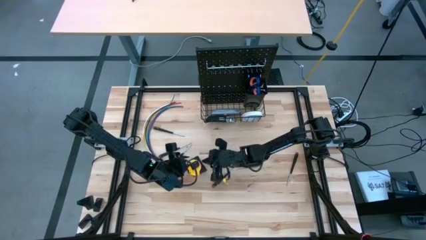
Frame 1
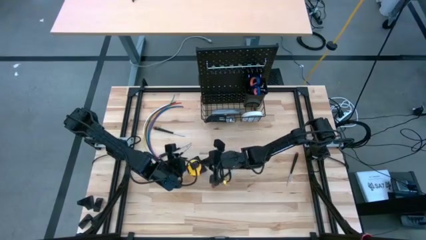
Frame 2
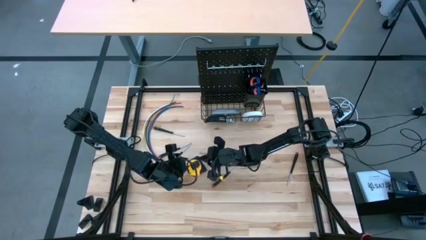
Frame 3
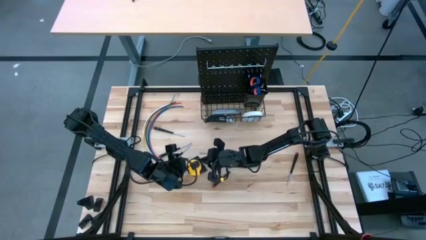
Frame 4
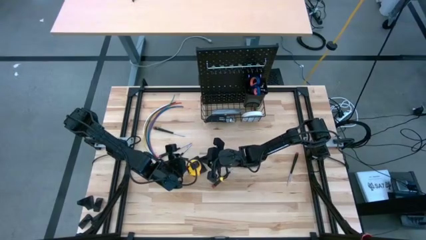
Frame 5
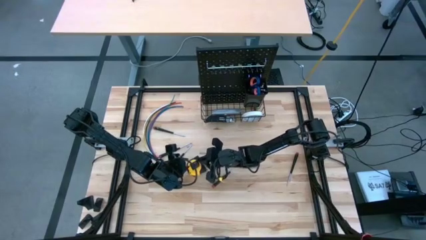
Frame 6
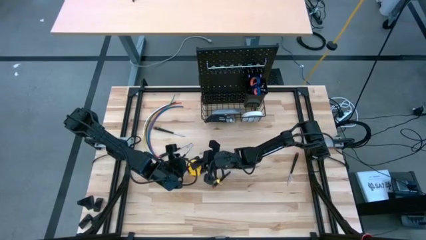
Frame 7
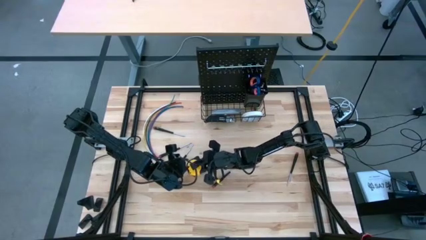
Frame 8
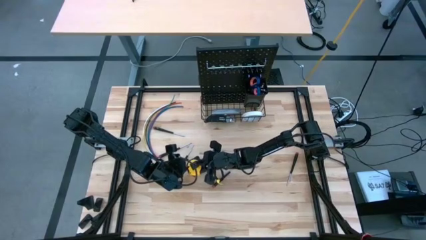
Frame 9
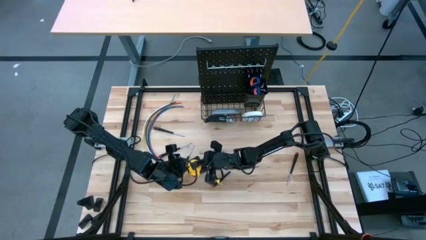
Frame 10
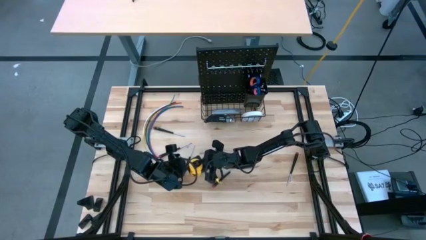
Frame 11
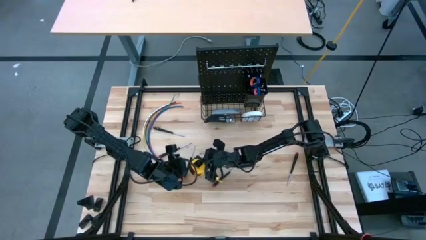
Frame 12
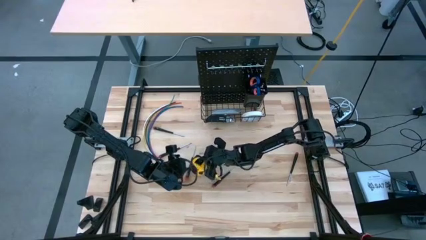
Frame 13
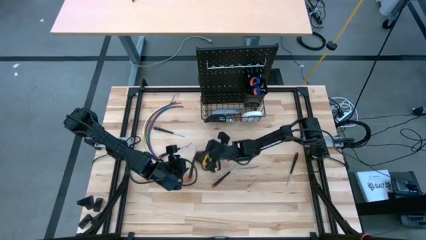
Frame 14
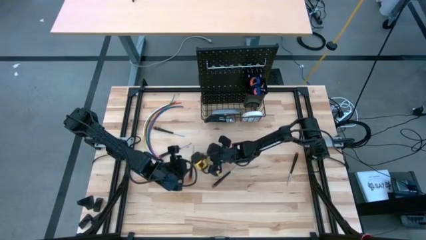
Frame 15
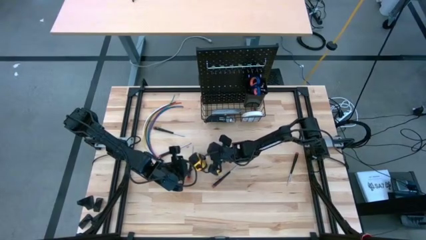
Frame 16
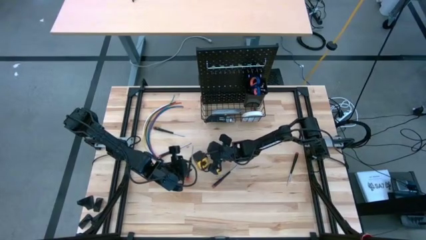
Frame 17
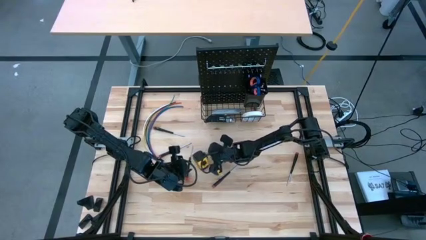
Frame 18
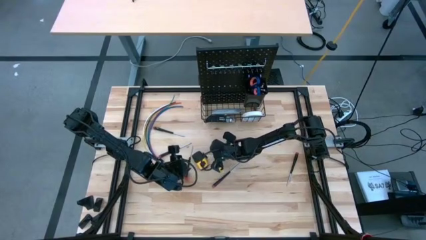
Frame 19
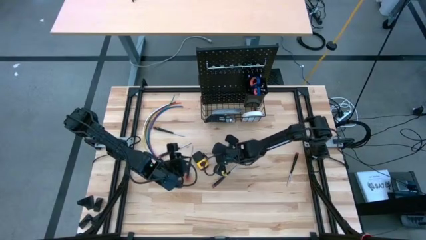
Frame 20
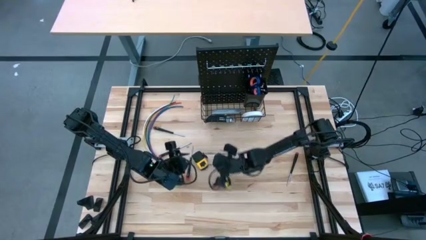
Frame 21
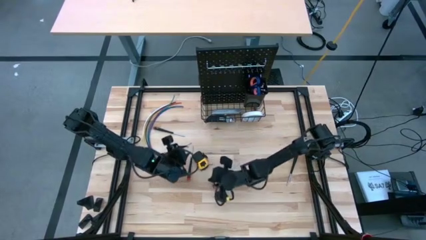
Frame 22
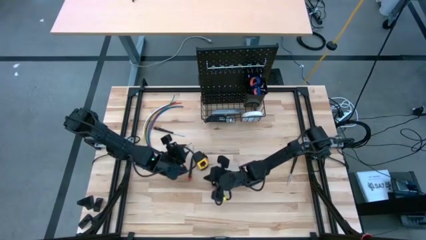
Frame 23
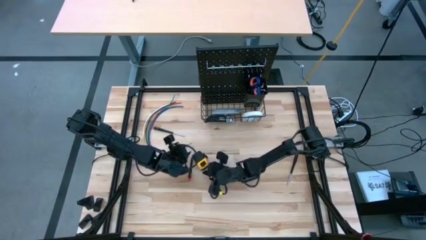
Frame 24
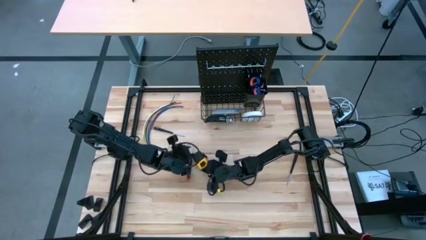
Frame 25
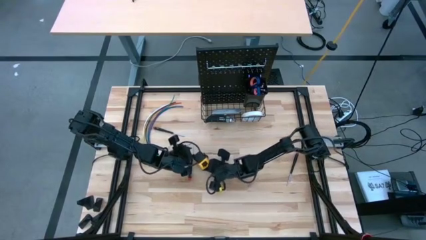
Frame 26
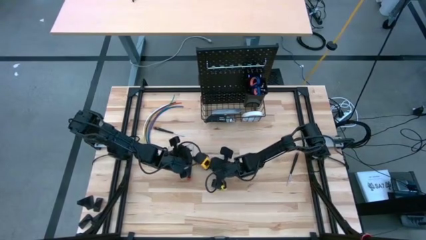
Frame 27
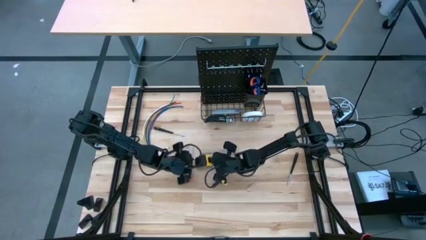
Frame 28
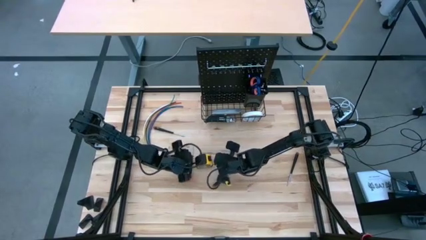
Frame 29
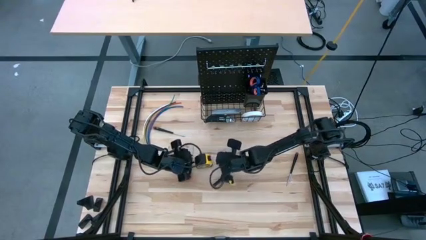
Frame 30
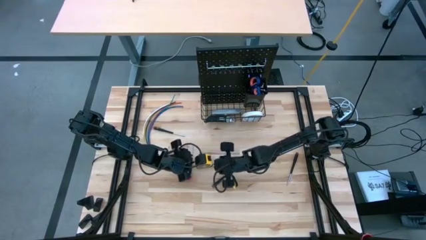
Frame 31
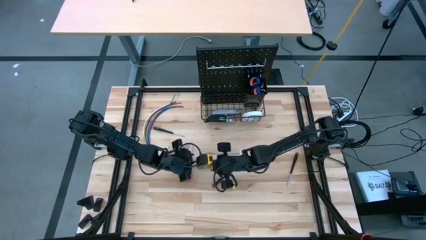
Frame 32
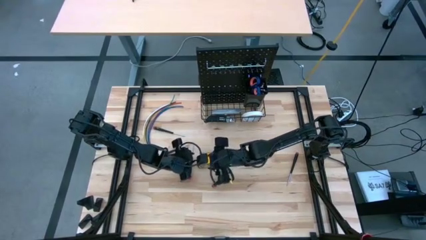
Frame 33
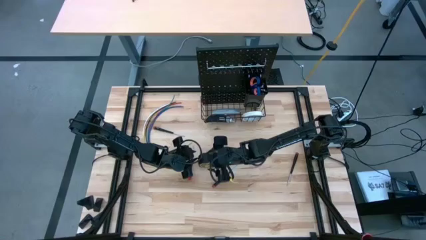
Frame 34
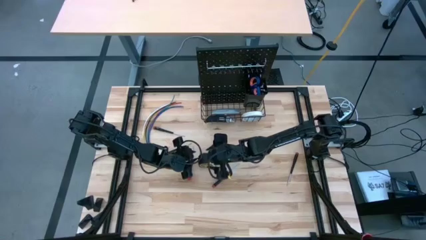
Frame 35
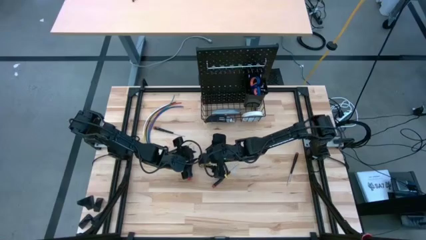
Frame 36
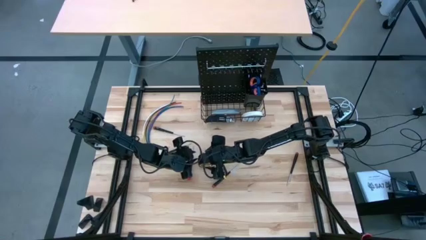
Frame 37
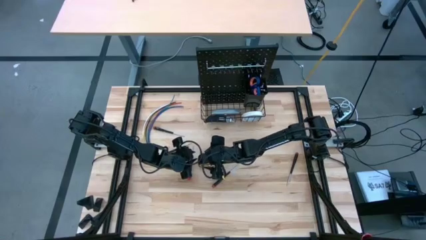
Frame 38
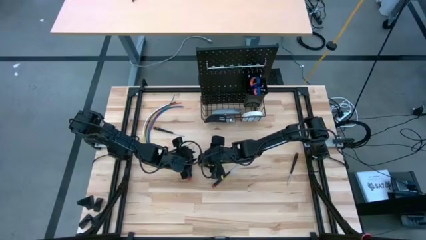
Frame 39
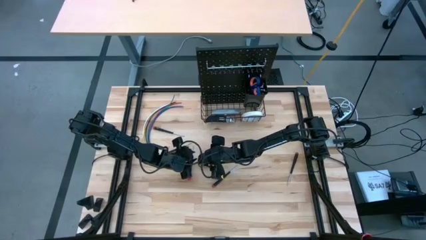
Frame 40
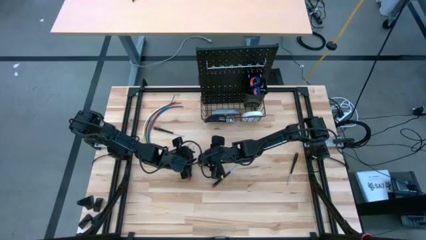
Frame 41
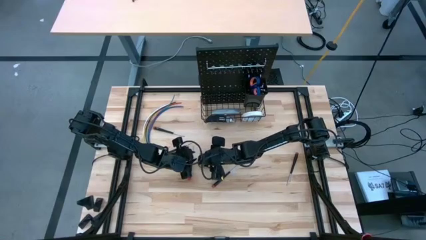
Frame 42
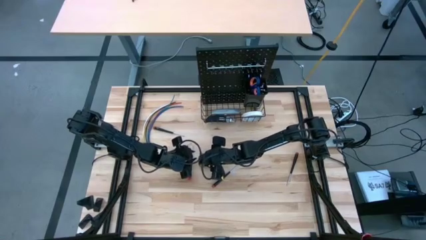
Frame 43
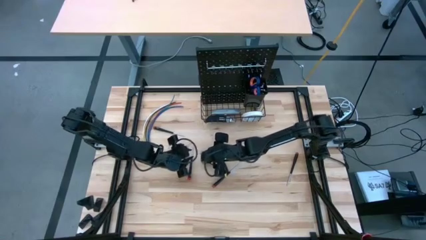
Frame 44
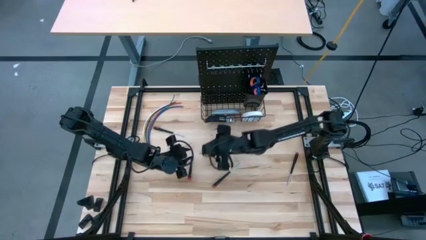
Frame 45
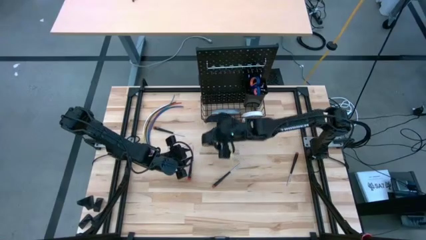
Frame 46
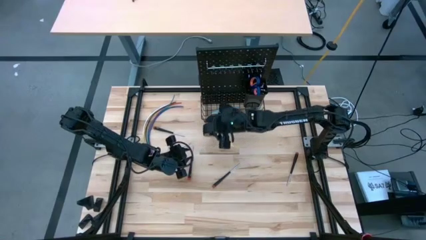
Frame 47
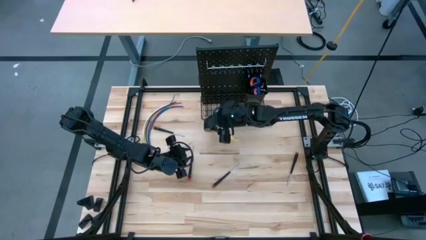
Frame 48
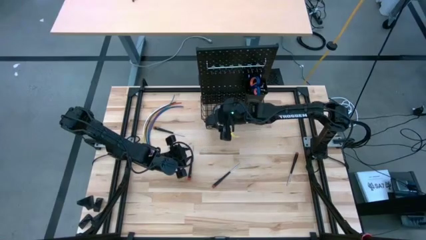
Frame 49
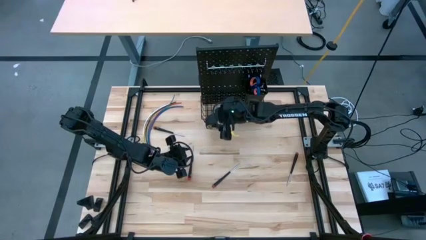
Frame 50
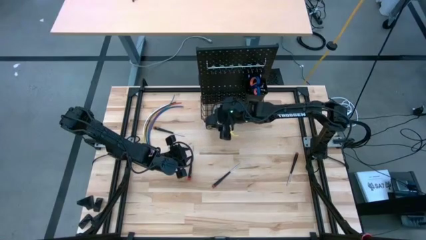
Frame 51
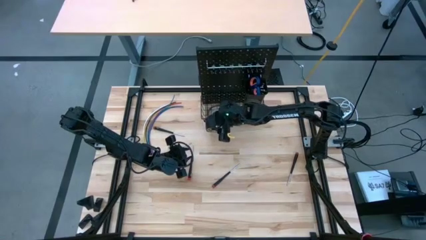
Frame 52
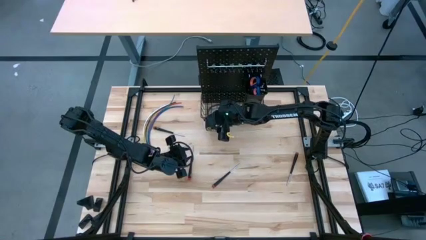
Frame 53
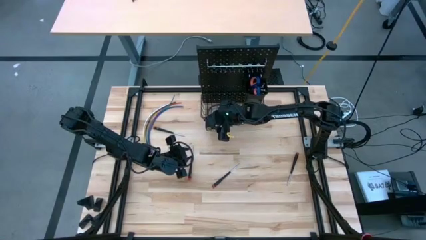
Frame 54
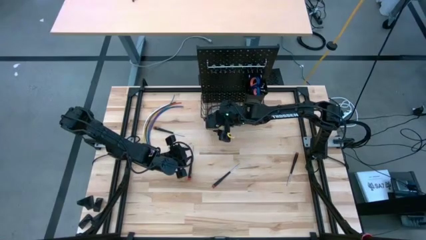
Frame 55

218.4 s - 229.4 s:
Task: Hang tools onto peg board
Hang the yellow tape measure on the pegboard
